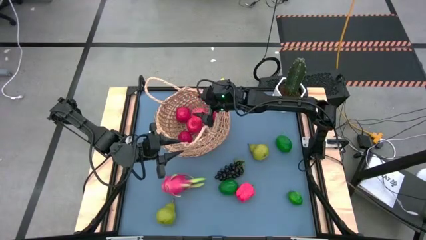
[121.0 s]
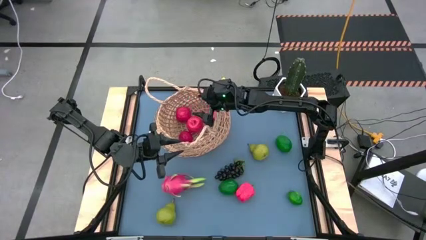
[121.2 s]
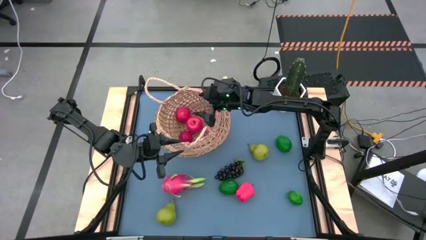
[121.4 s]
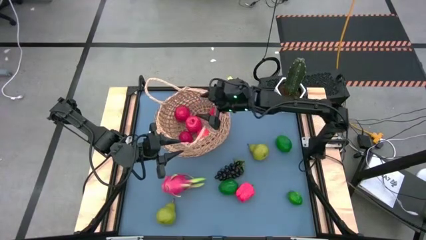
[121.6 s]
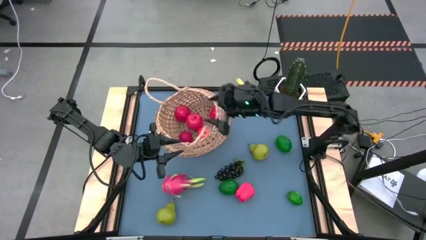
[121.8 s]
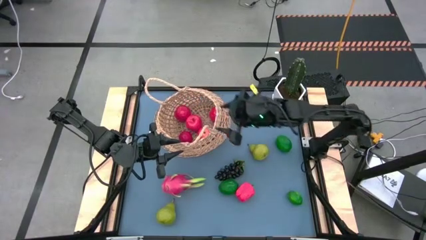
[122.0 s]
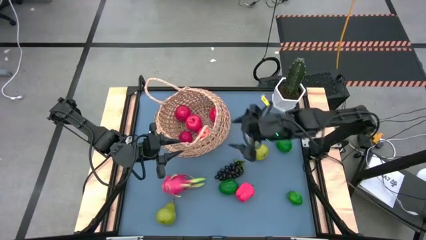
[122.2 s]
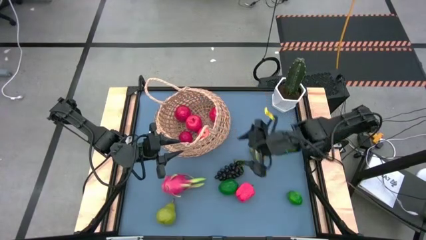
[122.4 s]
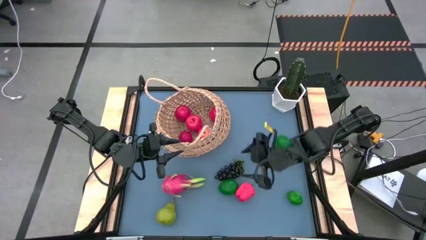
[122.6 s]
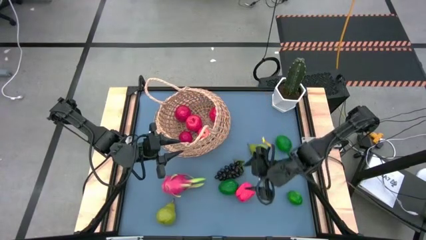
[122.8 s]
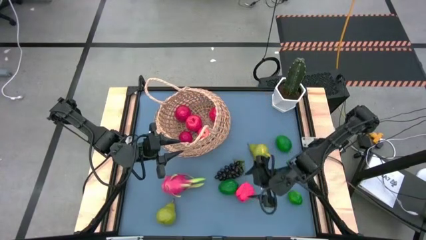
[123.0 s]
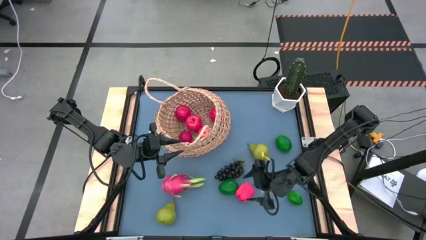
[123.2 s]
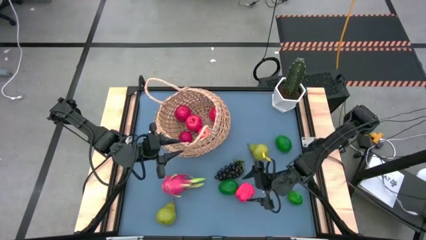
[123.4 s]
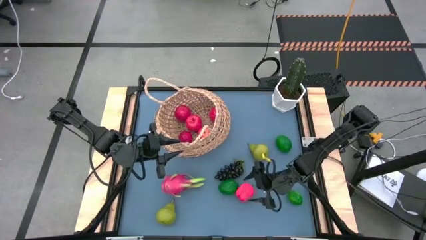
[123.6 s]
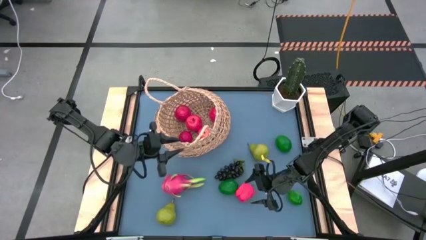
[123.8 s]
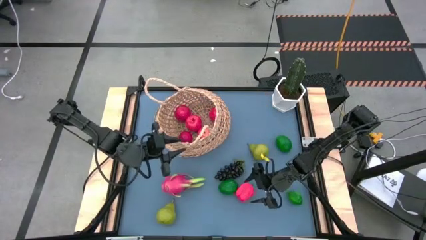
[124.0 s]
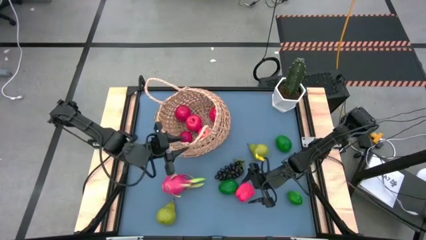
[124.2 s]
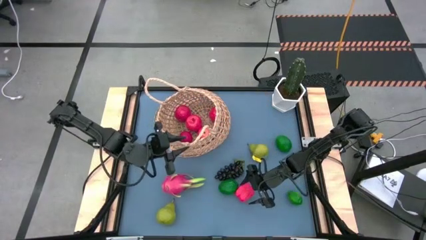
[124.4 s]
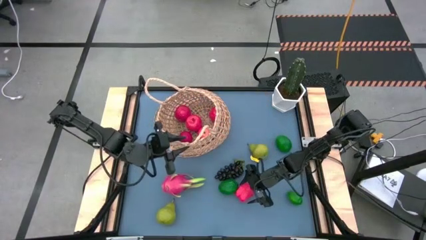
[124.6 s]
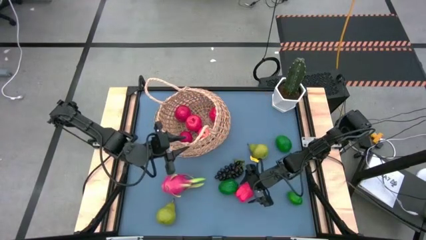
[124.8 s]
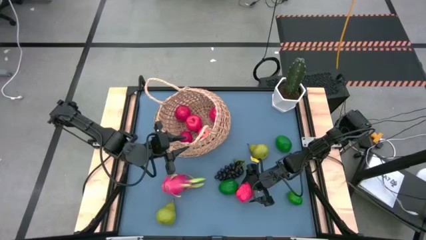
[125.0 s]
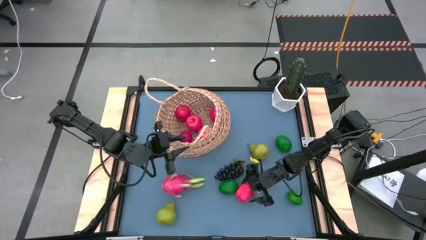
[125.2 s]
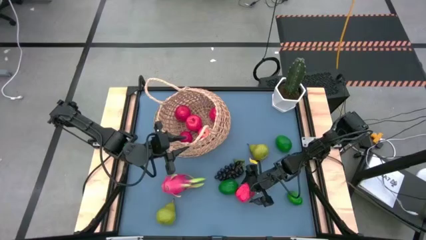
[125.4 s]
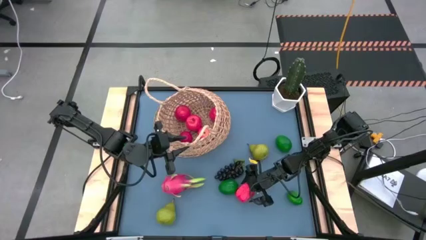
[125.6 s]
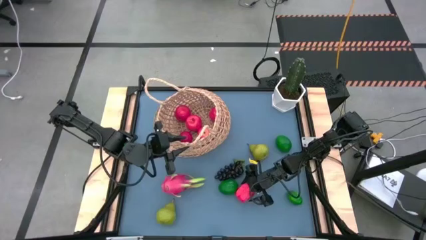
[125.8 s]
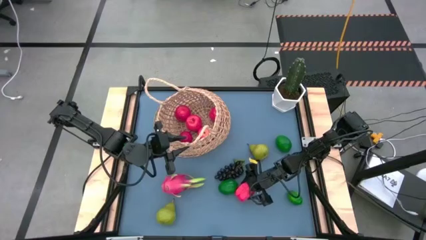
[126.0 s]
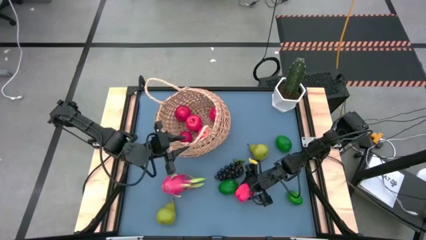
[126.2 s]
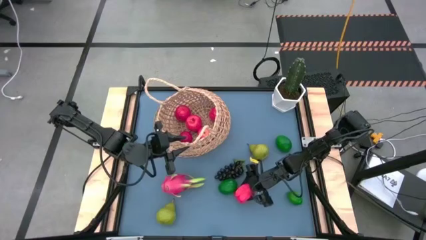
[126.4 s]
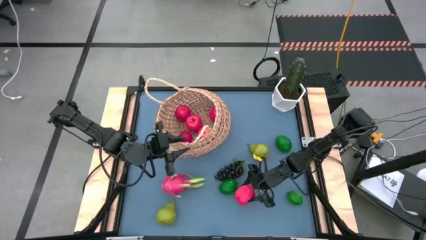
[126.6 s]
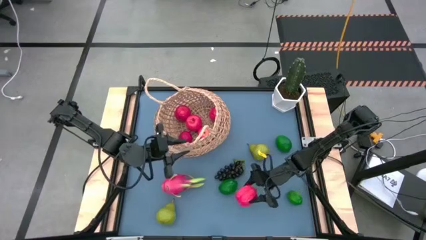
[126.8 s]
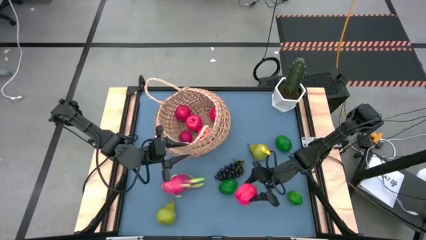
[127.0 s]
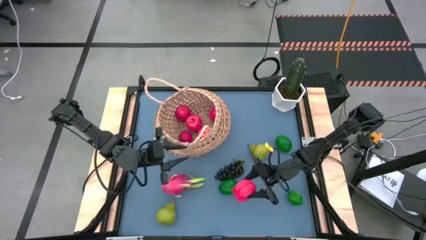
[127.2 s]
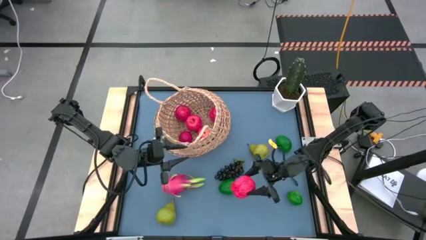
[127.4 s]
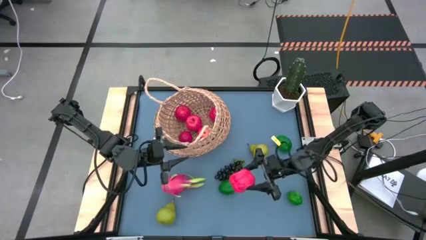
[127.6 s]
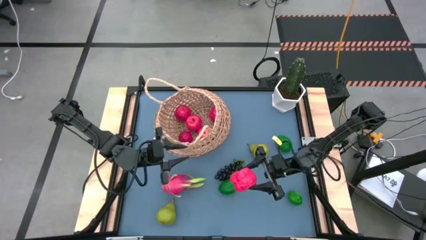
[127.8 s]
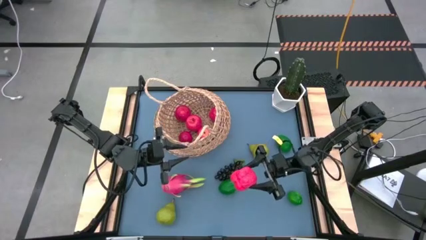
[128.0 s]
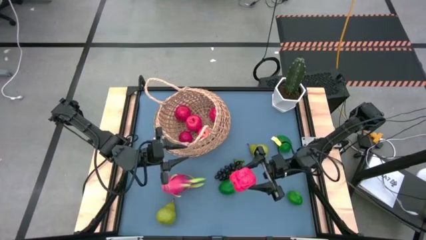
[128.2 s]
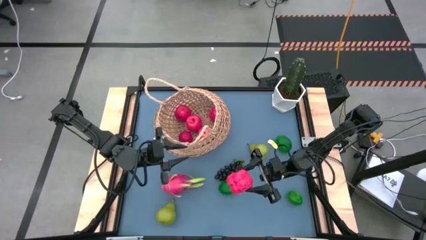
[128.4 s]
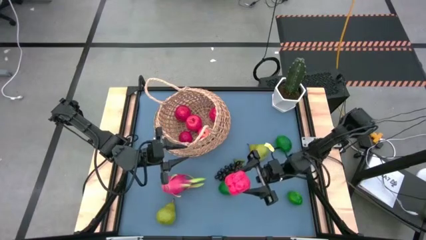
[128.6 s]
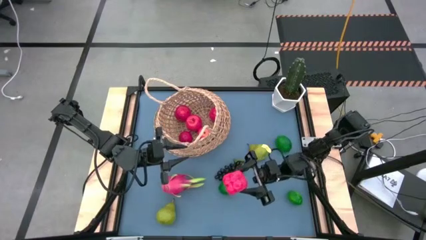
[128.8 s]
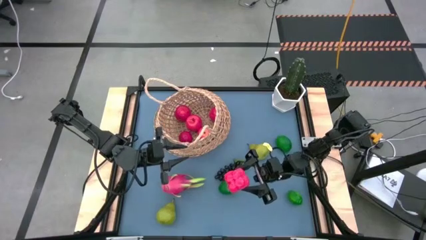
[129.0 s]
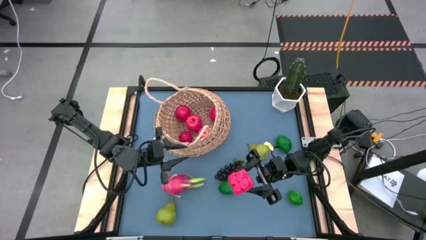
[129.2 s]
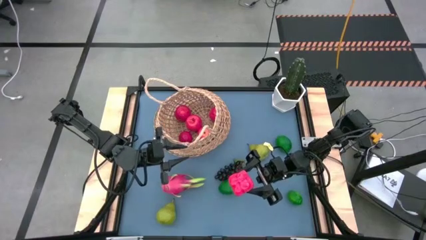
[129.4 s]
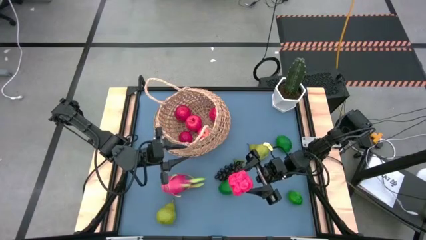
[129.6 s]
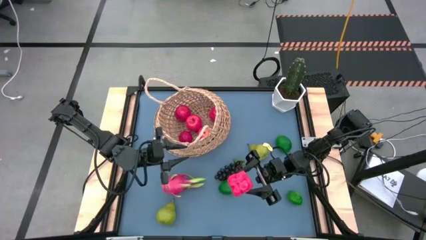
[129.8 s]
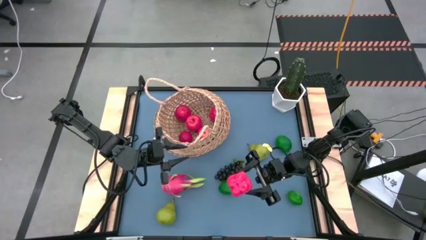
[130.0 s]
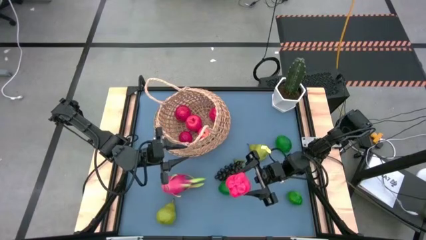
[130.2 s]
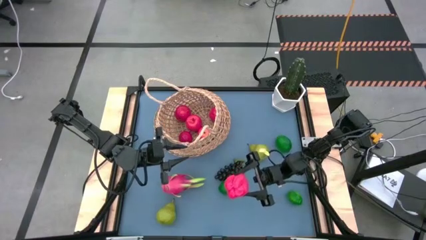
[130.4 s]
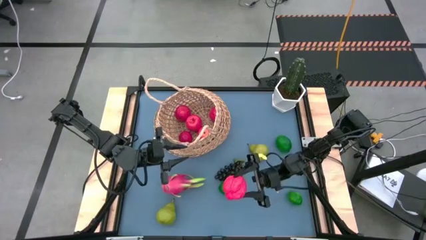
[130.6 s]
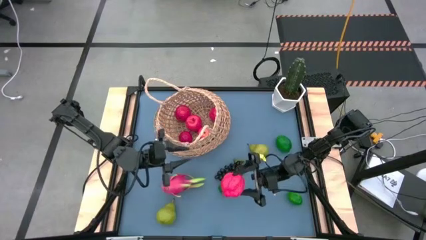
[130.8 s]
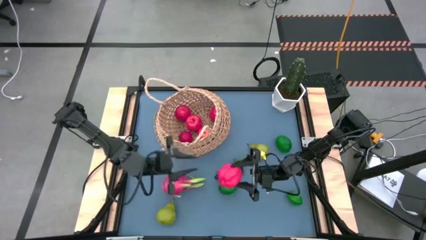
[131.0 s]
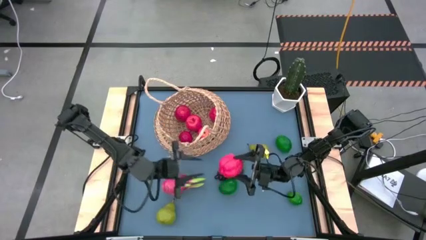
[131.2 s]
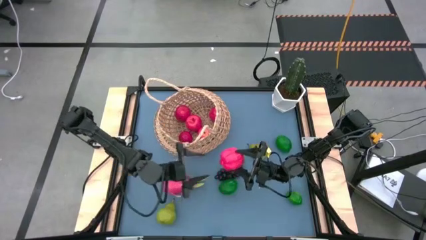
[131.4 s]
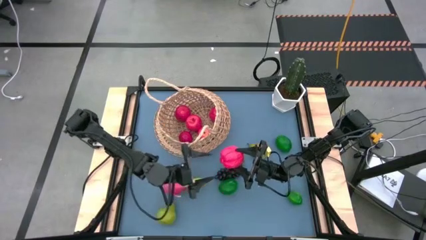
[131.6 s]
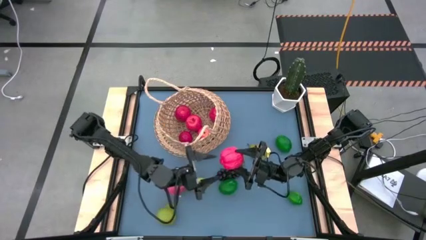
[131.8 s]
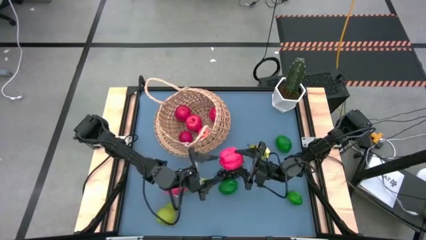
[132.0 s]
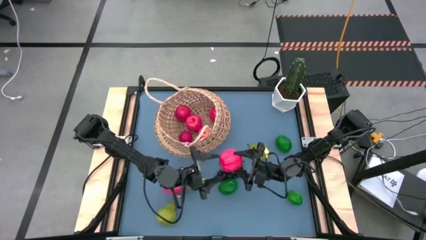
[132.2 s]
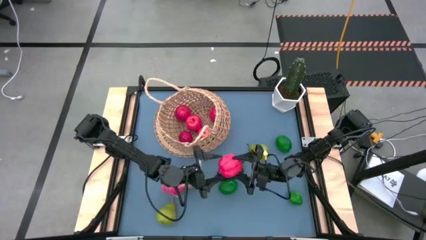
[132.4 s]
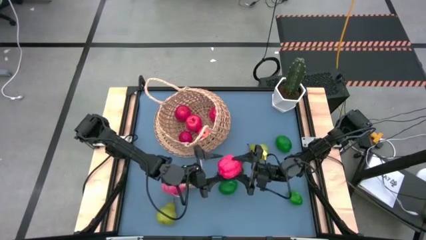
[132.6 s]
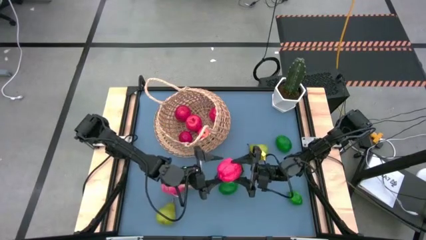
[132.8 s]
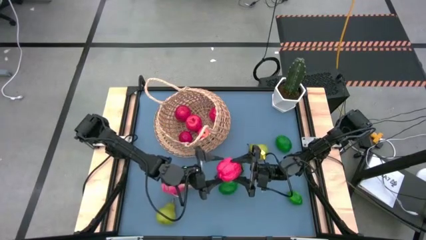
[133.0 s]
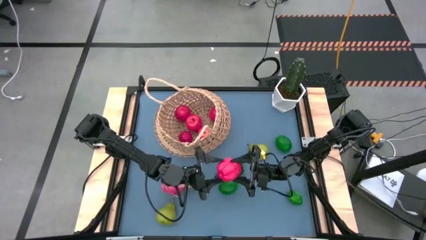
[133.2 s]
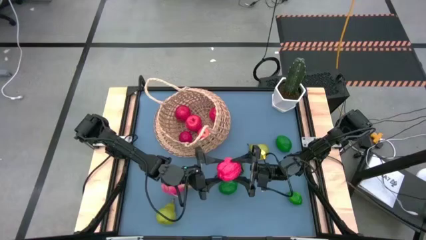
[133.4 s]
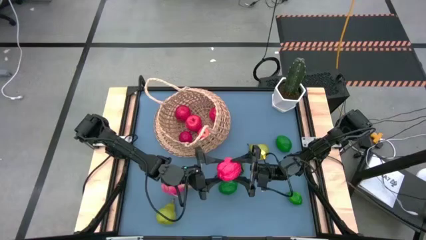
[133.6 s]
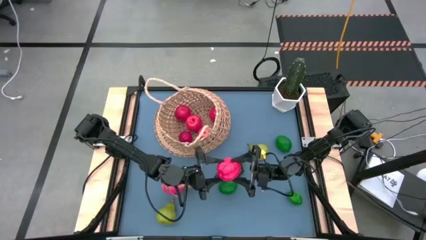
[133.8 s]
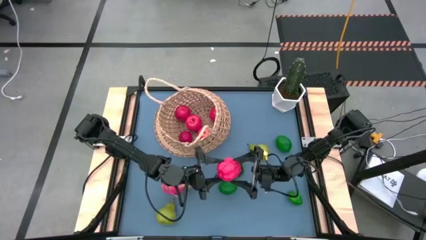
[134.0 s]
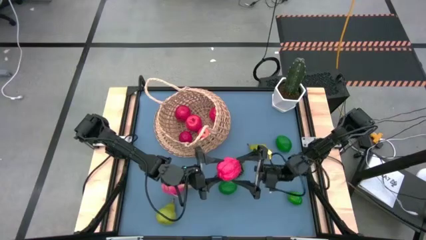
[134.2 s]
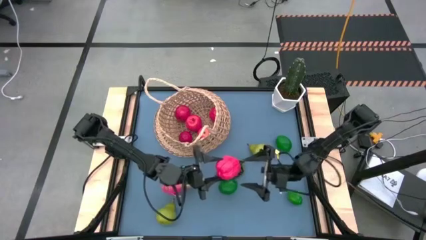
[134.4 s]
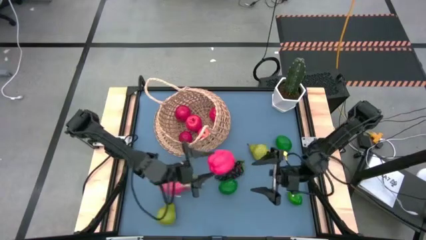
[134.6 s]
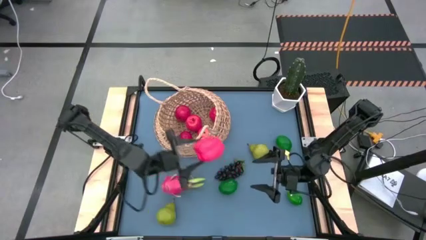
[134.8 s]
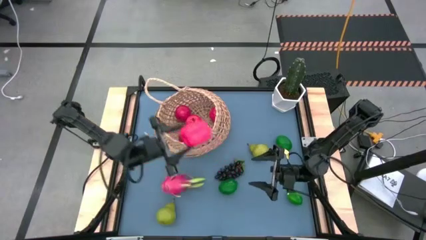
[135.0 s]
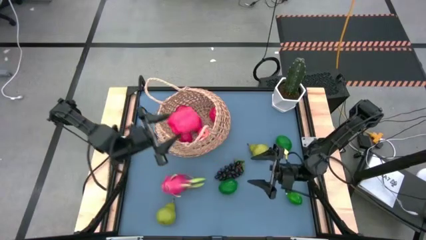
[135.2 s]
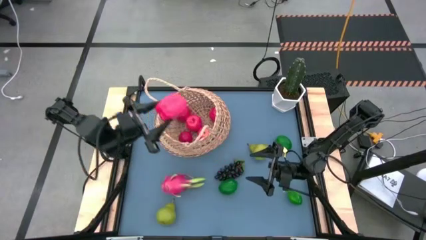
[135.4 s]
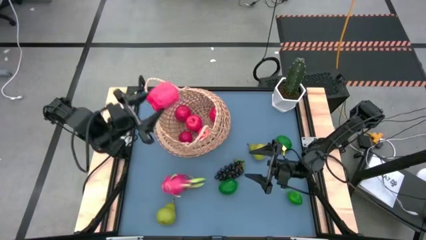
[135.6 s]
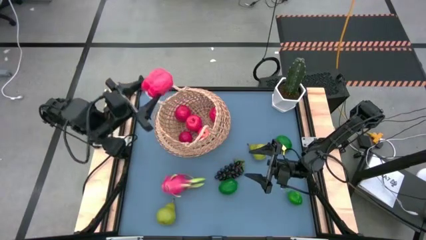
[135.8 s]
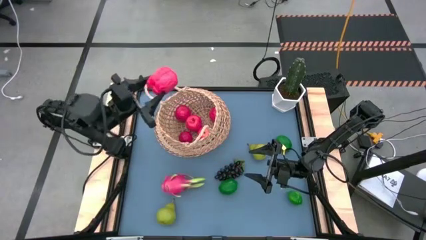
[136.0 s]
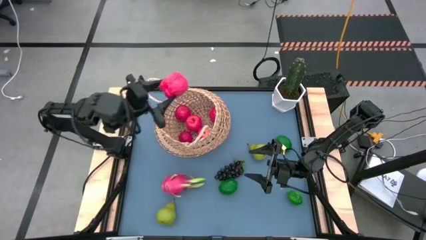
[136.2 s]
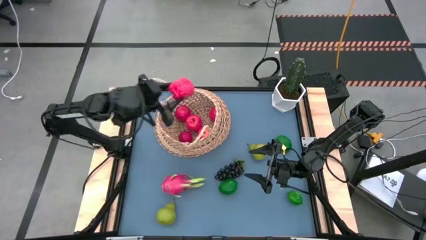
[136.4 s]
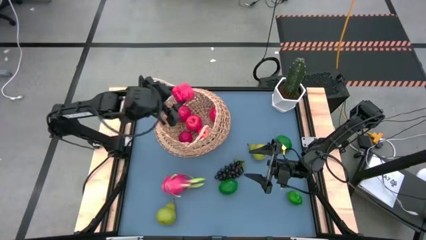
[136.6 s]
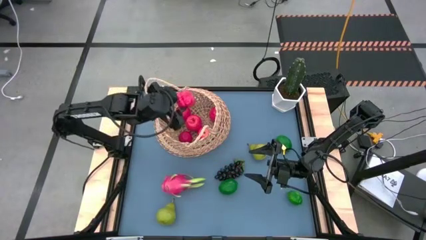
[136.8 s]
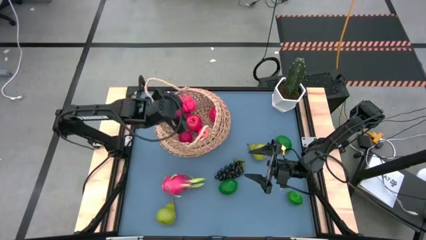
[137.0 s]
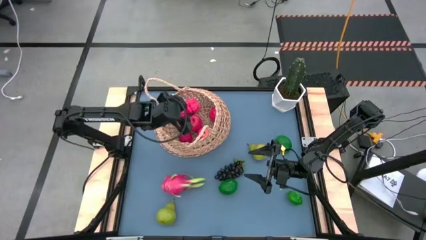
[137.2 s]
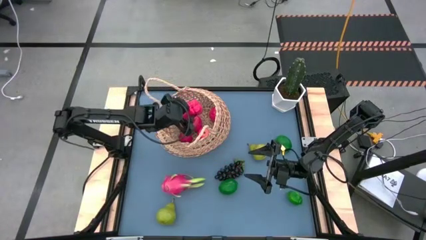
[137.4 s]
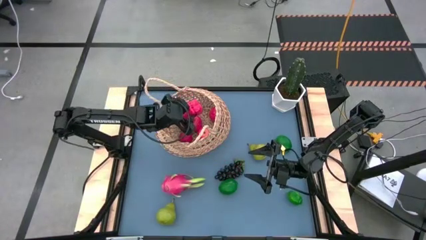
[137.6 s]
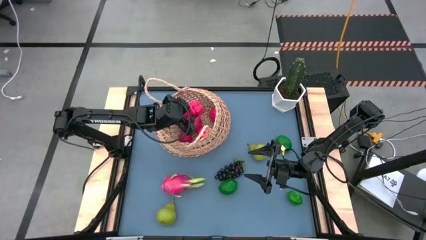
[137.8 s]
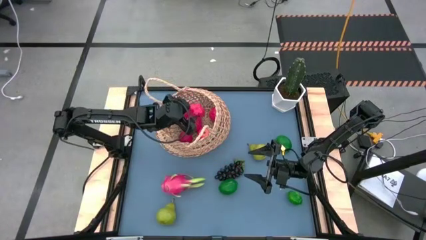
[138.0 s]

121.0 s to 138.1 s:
Task: Build produce basket
Put the red bell pepper into the basket
